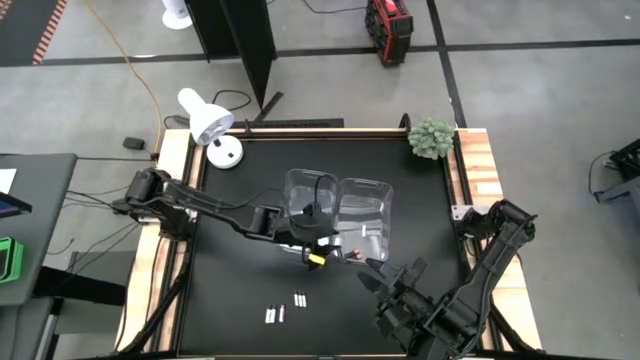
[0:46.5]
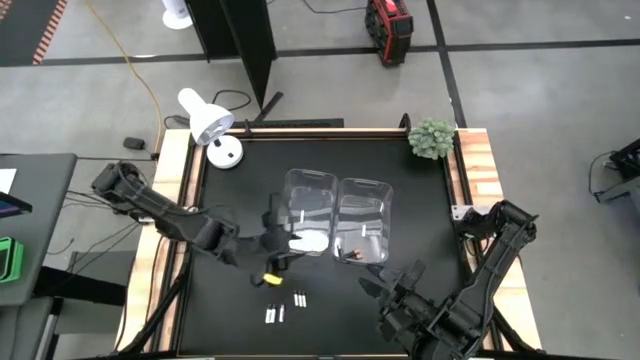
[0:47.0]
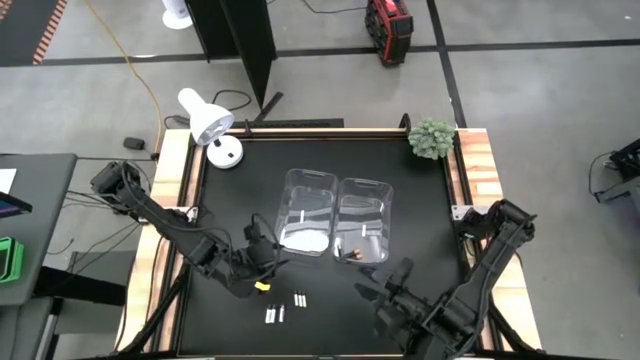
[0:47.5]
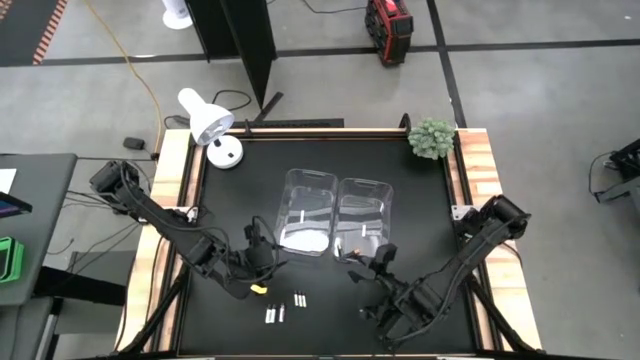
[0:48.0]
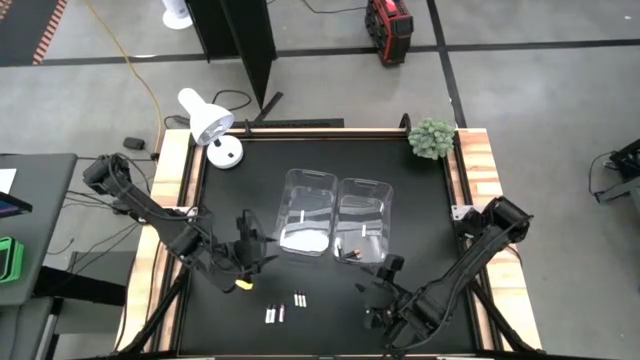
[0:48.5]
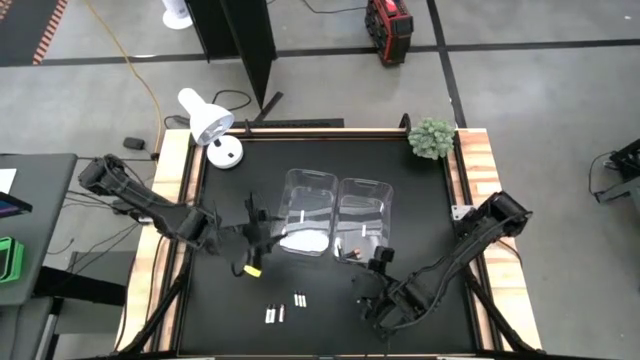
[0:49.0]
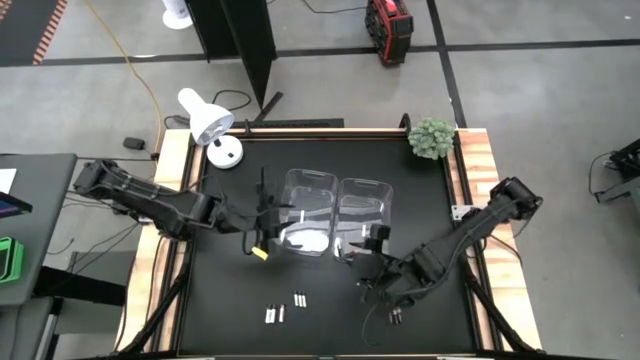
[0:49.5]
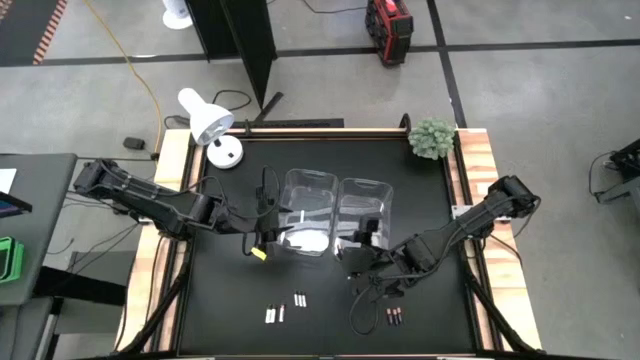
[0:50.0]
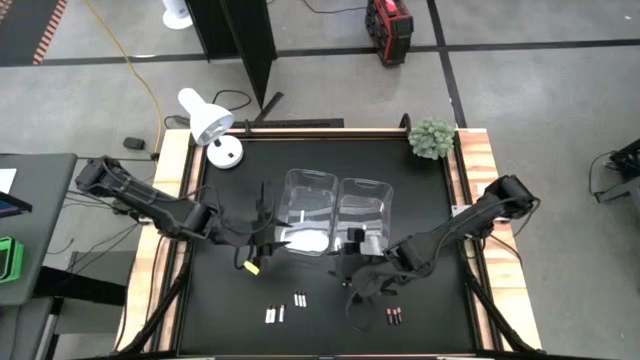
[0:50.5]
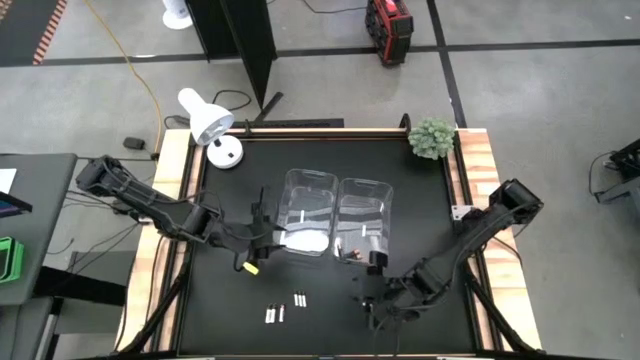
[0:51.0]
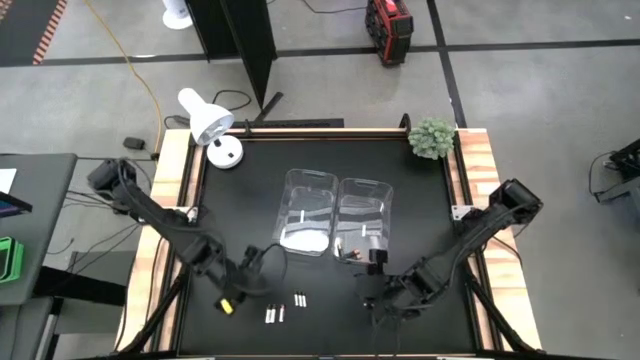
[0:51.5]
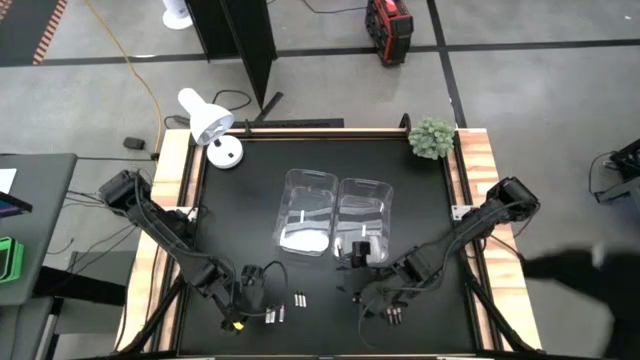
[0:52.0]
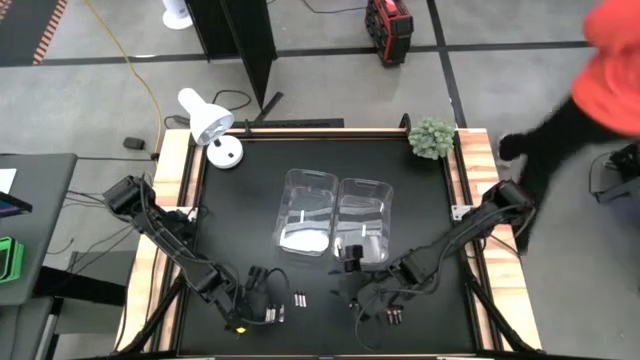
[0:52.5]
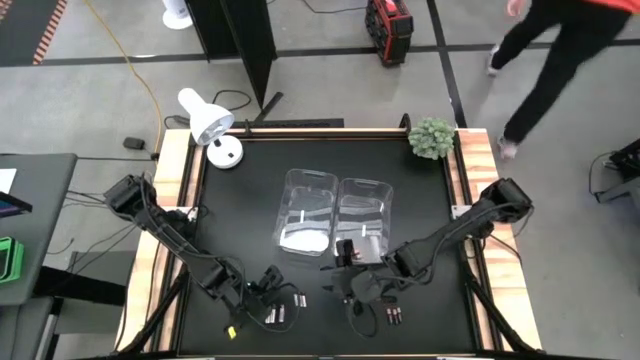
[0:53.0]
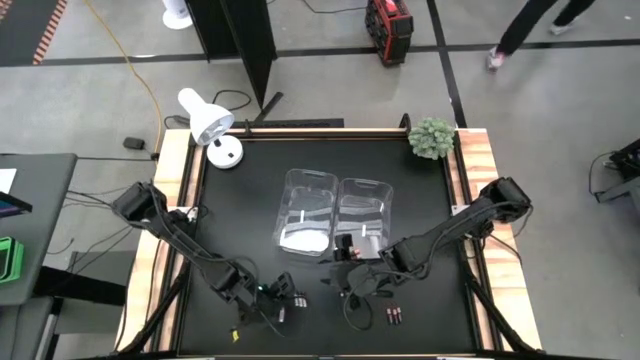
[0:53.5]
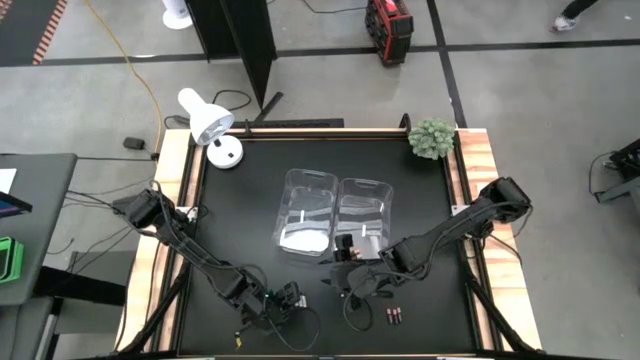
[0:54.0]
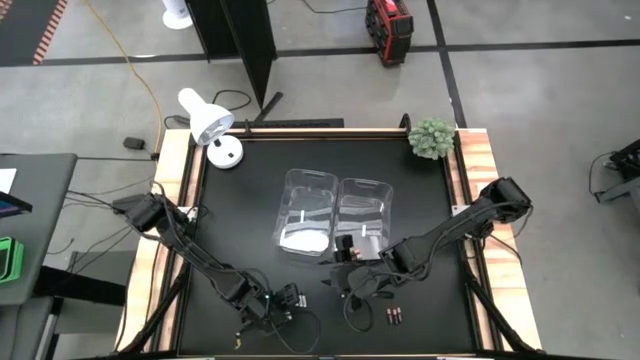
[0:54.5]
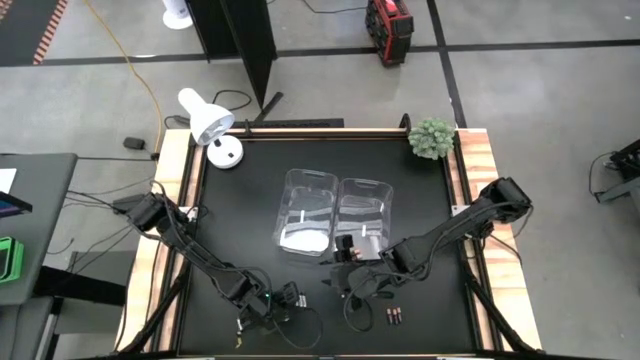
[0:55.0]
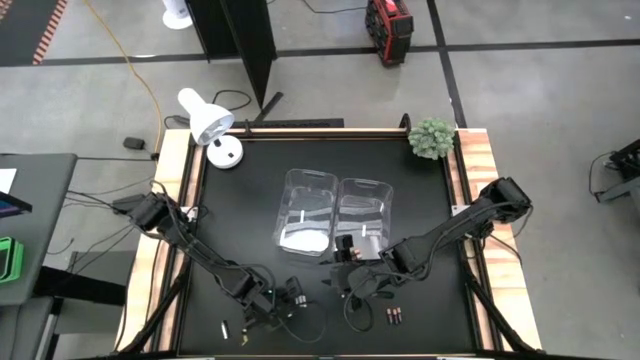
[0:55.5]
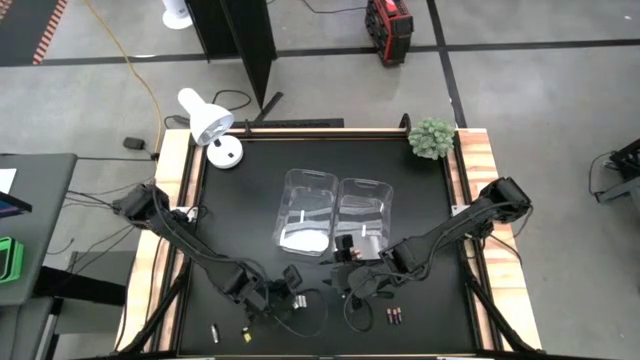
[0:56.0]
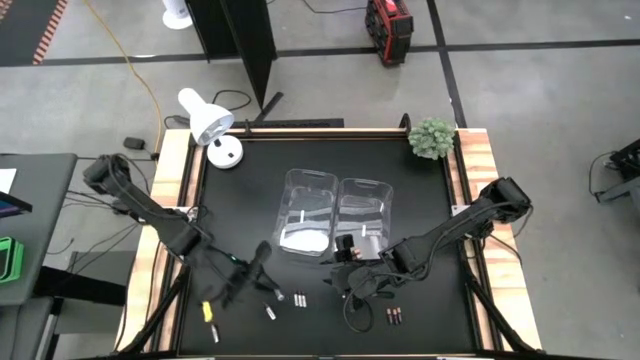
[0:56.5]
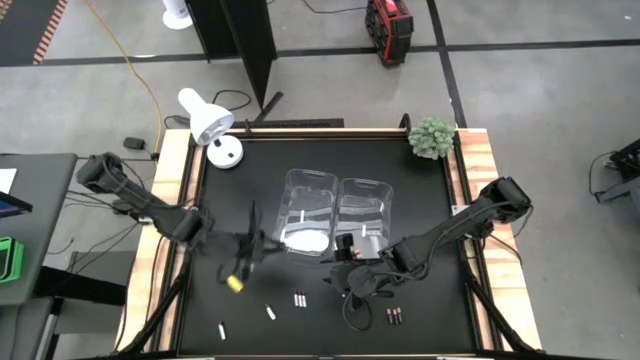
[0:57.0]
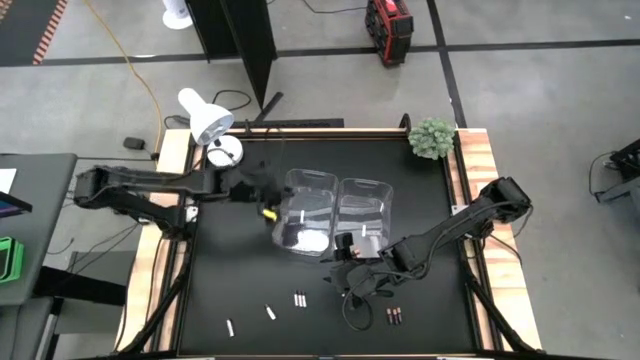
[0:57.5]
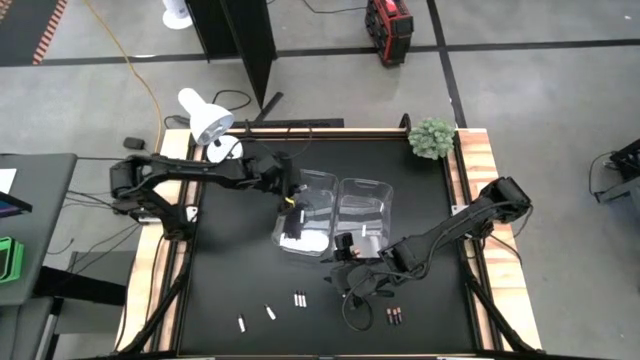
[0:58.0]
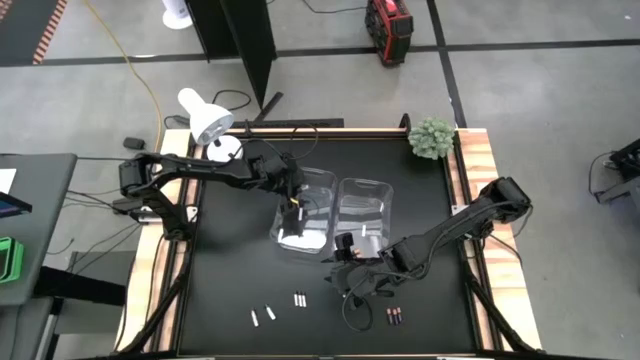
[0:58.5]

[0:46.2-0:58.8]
Task: Sort batteries
Put the white battery into the left transparent bin

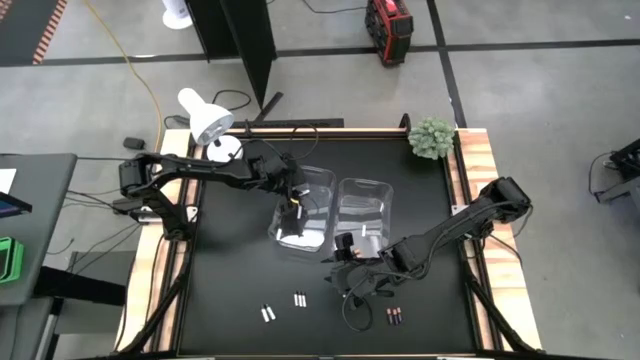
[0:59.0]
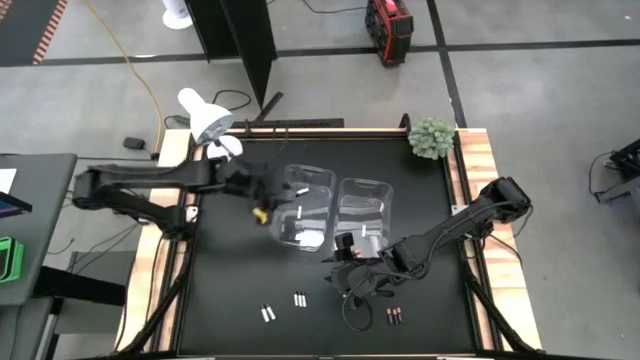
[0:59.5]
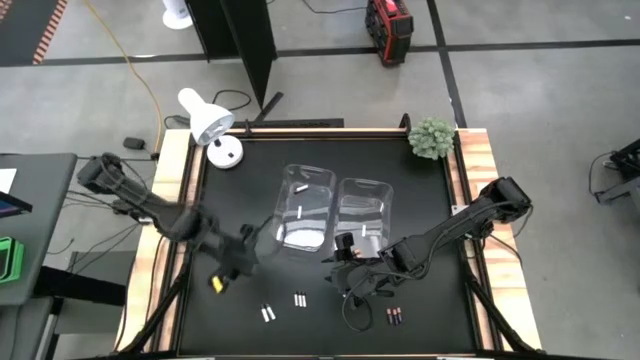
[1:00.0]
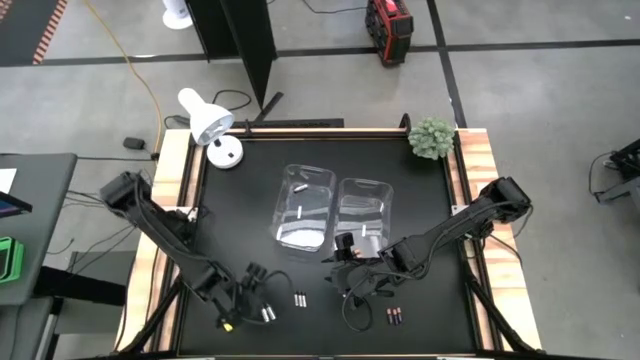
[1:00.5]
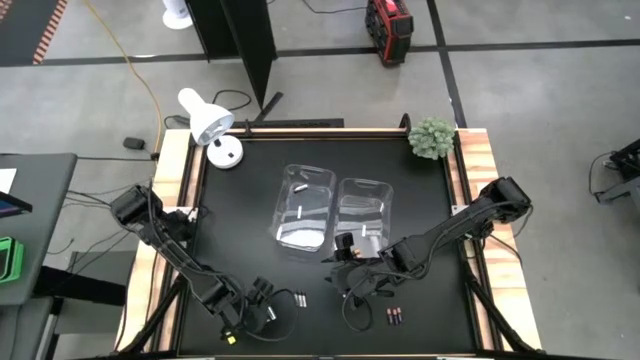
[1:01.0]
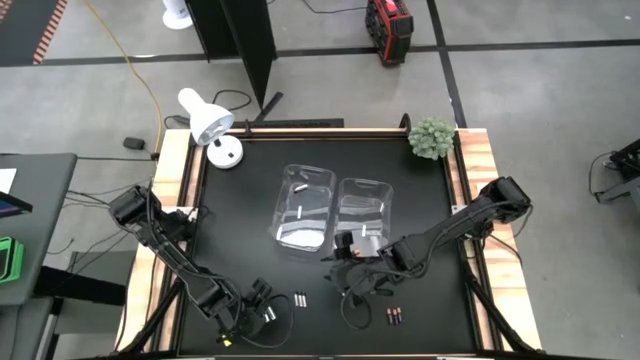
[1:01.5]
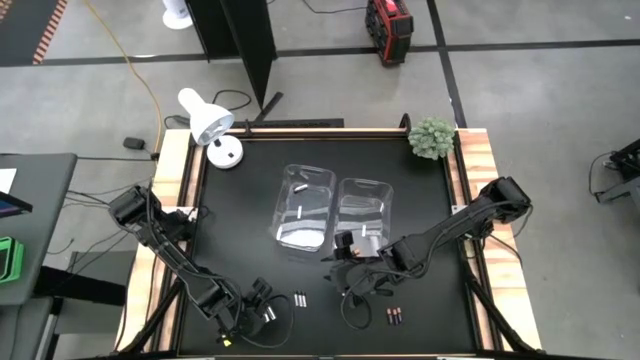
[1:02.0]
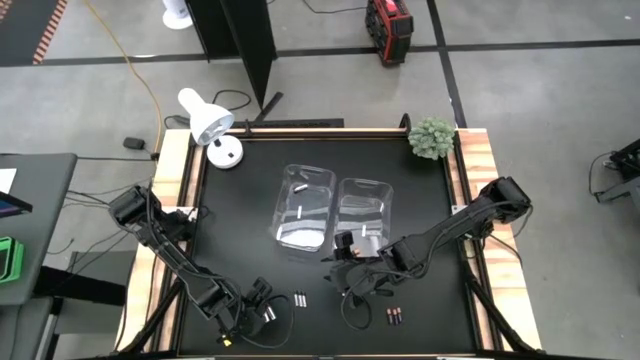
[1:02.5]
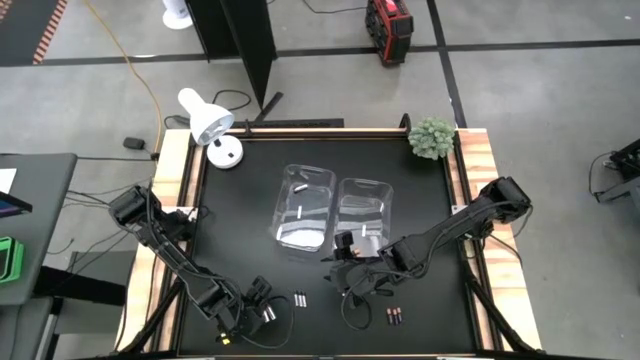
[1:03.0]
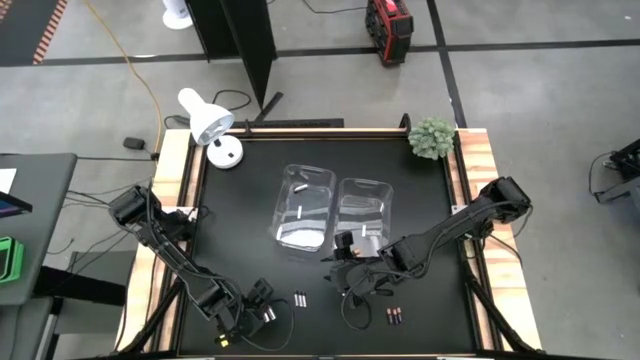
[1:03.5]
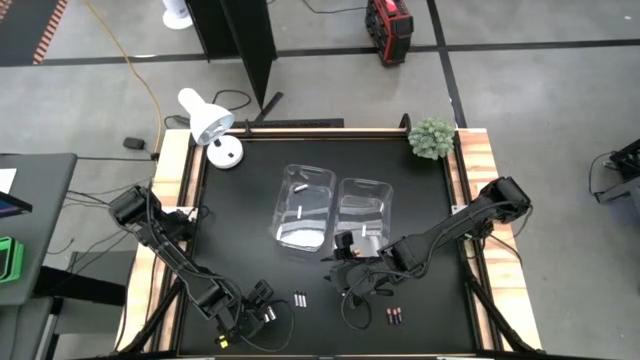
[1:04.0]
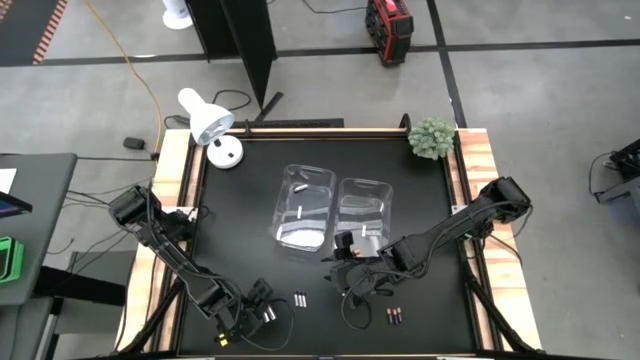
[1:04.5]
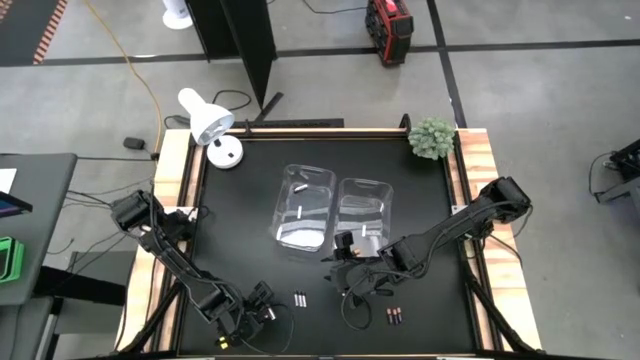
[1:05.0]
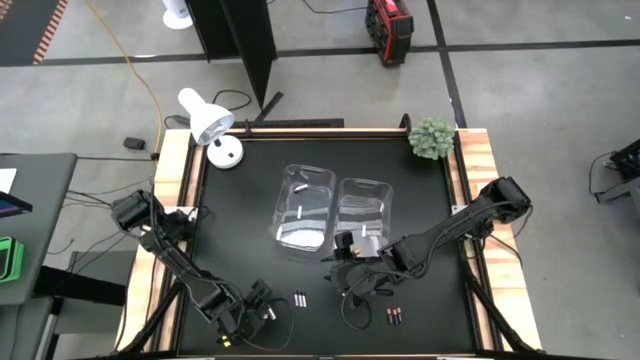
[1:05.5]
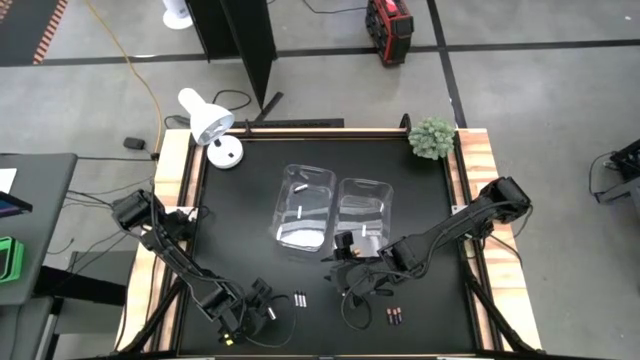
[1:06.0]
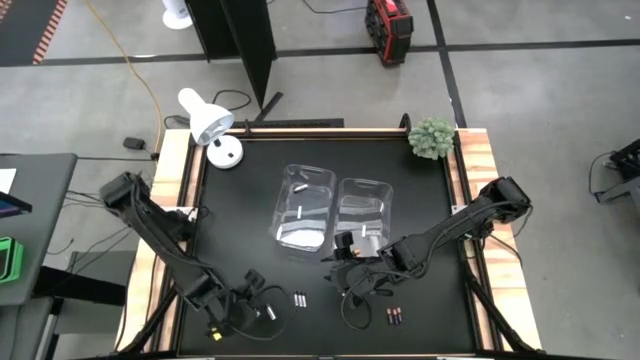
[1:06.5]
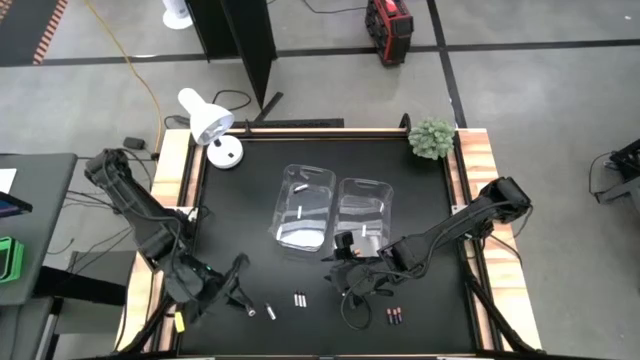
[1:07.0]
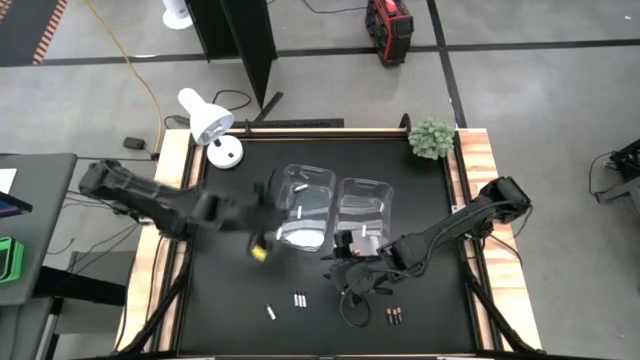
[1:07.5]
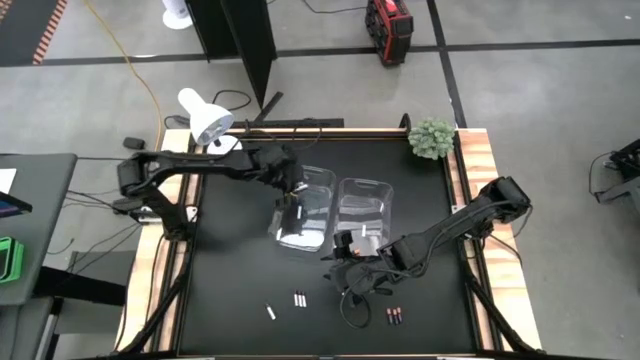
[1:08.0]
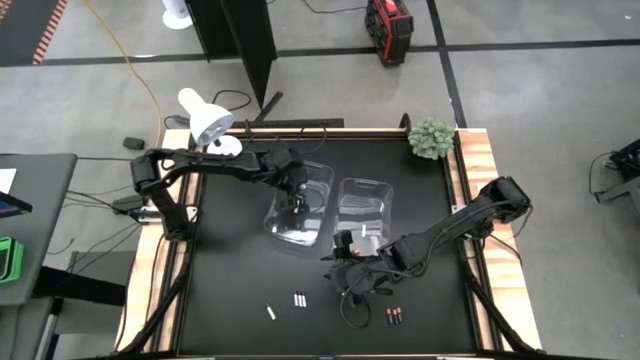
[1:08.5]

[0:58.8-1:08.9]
Put the white battery into the left transparent bin
